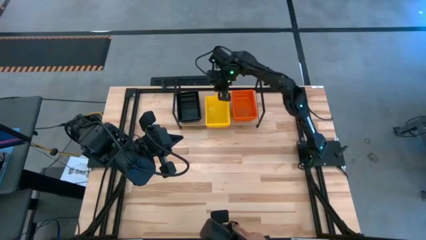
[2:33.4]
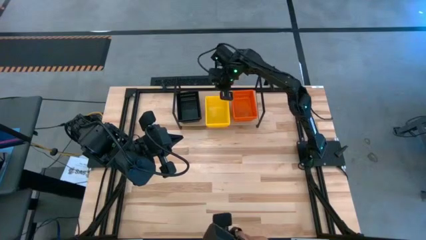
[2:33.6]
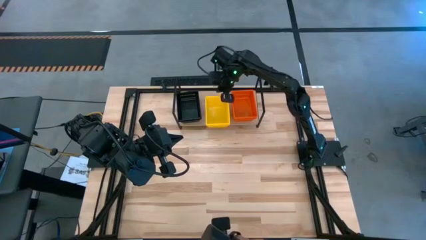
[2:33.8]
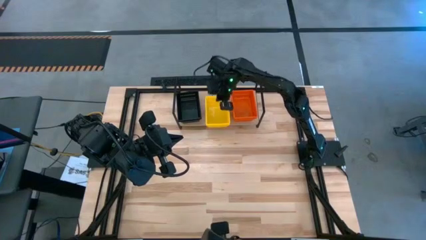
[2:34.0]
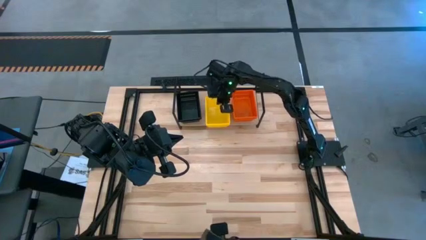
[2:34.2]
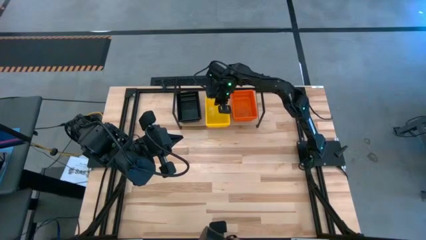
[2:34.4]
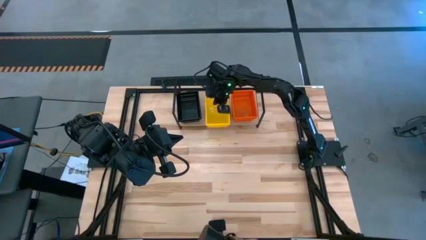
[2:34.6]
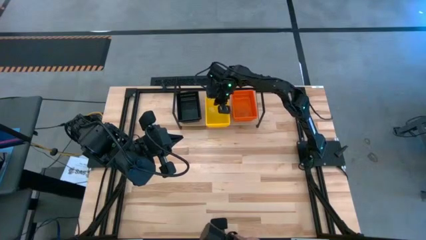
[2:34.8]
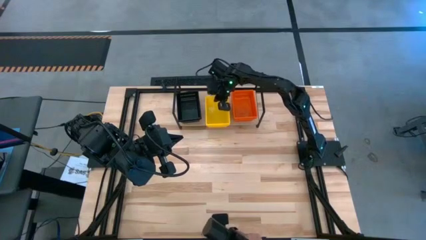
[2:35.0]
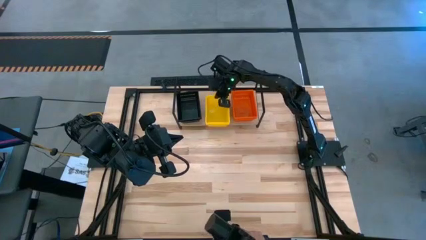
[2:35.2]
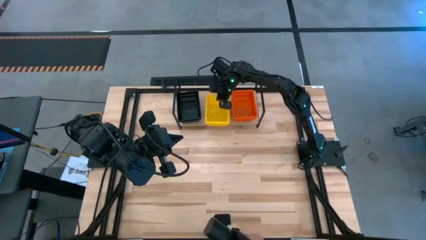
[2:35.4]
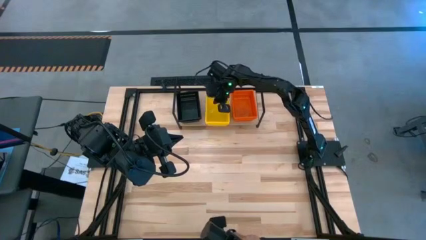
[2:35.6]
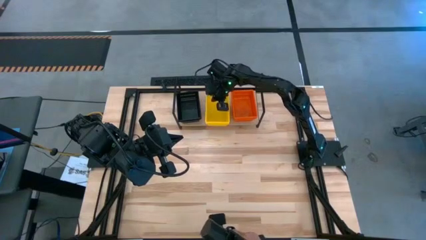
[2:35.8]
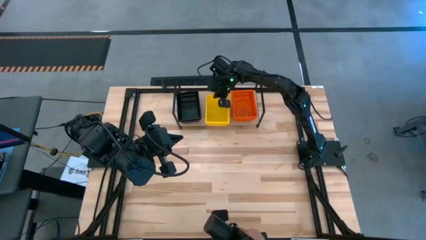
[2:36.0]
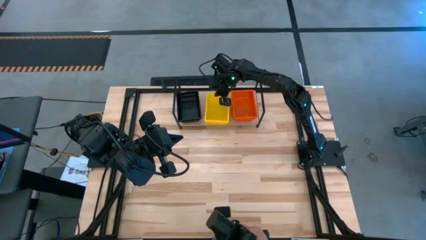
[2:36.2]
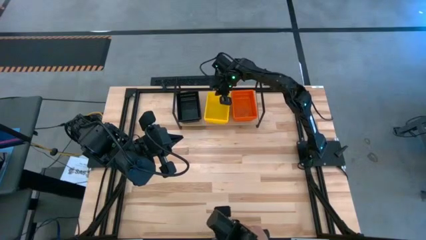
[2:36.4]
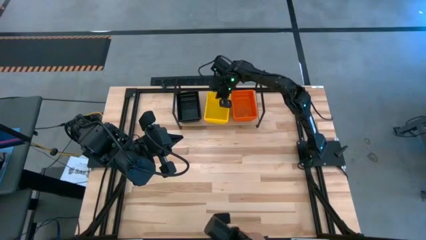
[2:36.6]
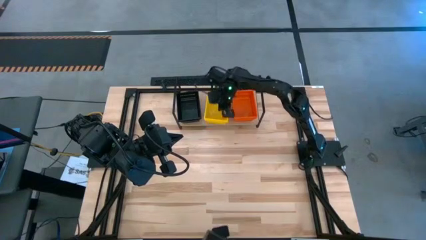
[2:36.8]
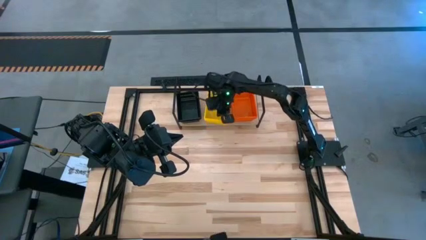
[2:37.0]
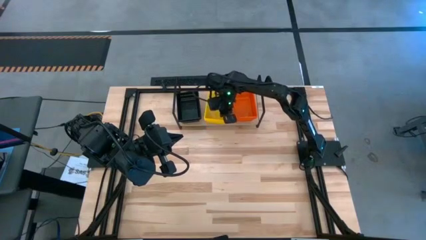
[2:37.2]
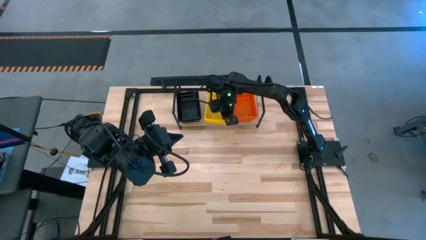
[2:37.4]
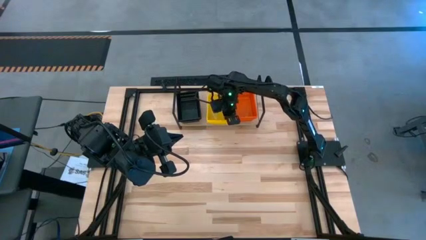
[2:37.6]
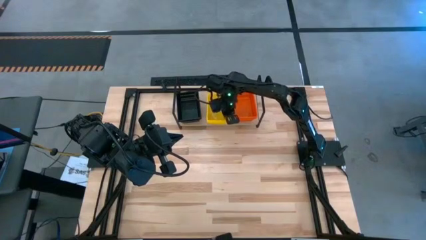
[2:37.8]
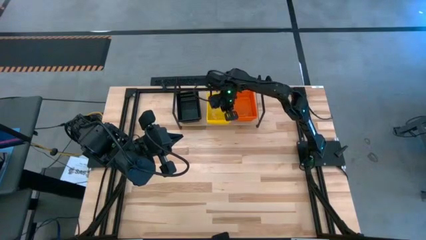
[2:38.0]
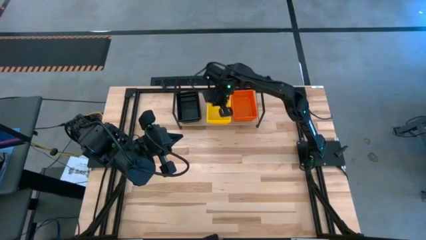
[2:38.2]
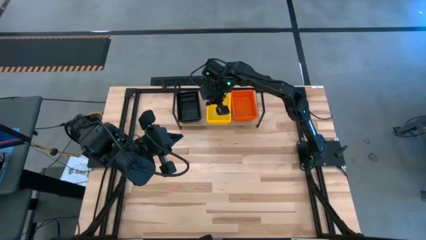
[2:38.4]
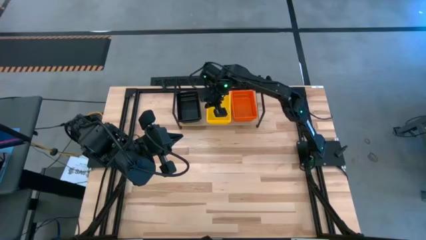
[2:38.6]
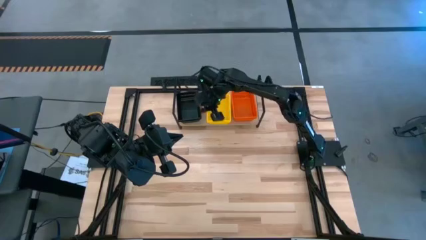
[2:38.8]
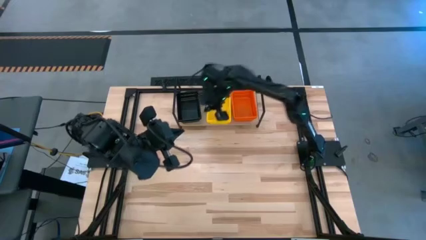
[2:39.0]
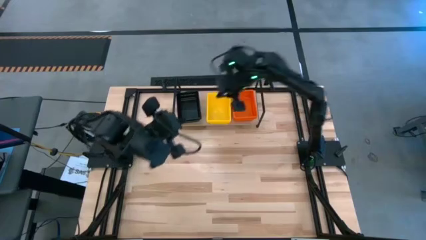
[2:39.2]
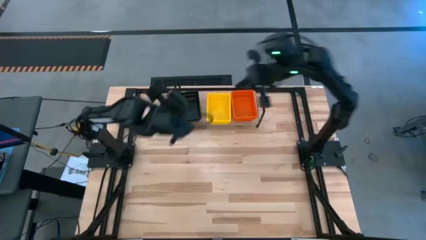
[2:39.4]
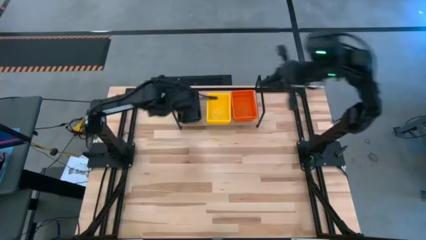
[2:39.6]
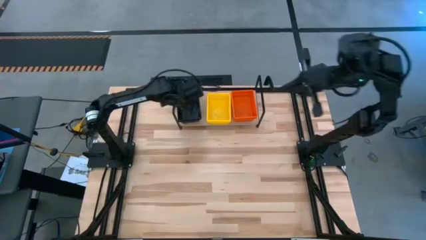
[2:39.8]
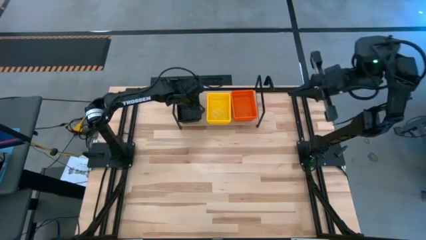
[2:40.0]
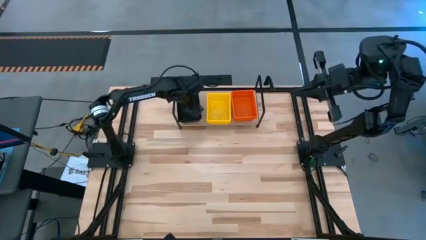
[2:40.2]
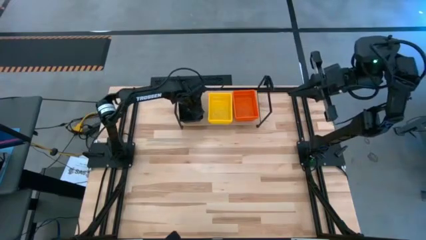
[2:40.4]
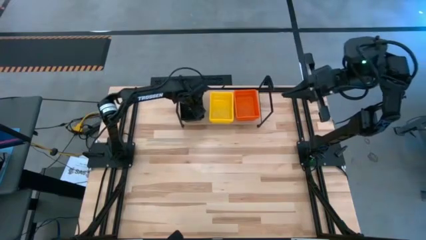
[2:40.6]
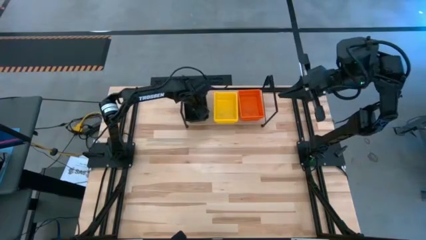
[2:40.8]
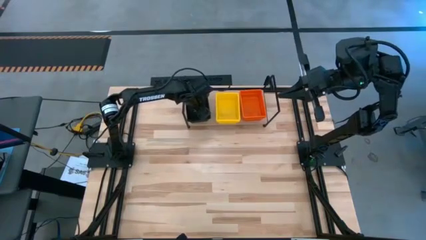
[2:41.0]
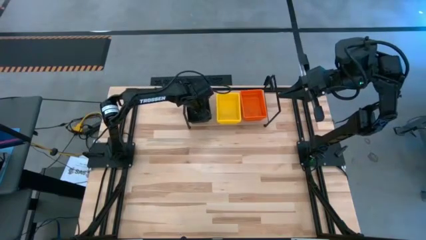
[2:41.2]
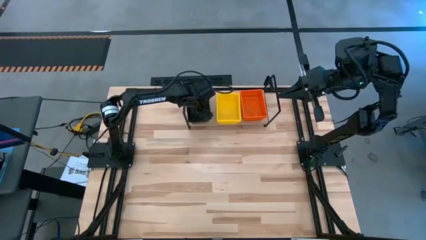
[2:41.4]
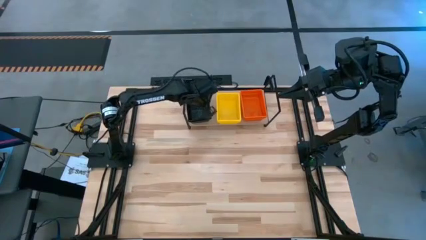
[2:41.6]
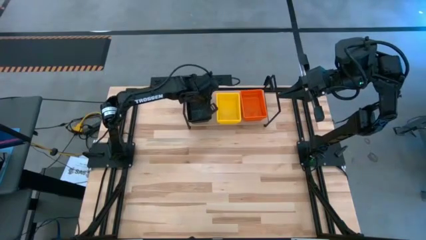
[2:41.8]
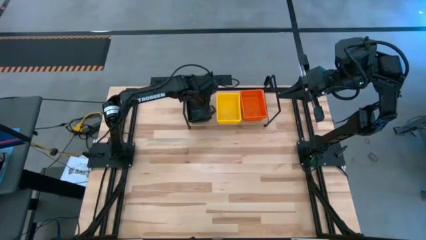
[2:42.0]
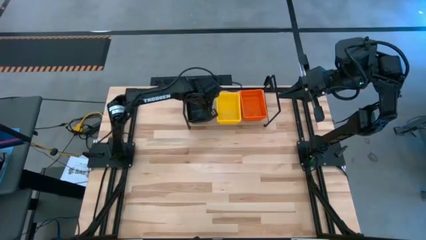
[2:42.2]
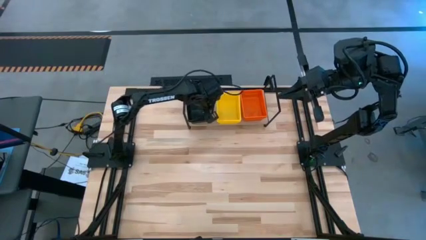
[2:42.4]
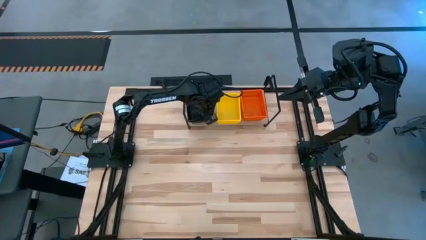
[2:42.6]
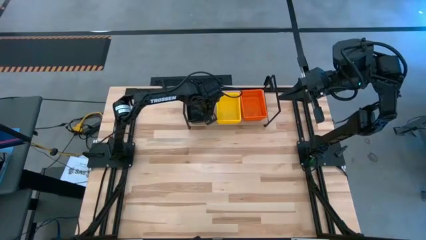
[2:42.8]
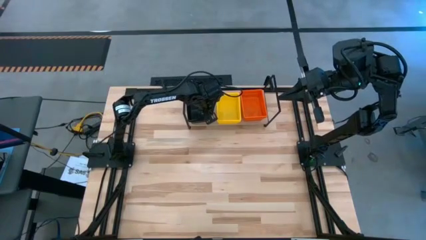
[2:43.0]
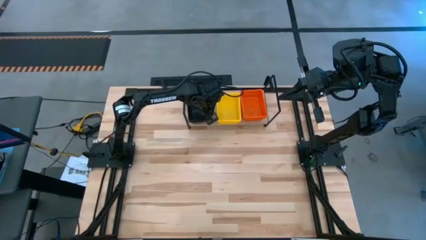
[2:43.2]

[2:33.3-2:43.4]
Task: Stack baskets on shelf by color
Adjust all the bins on the shelf

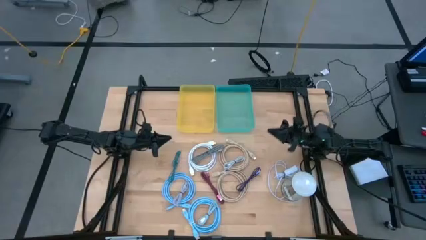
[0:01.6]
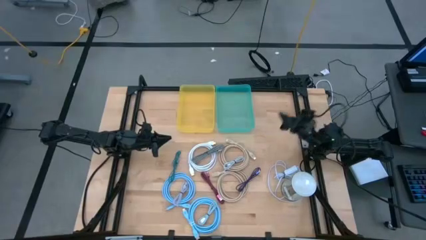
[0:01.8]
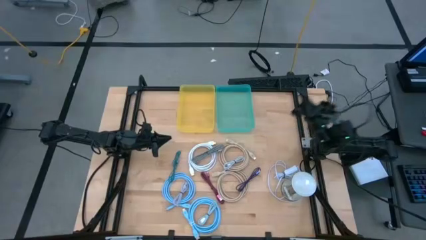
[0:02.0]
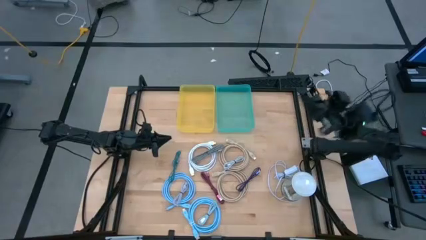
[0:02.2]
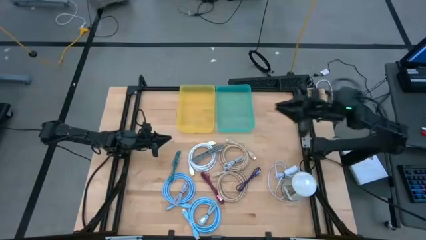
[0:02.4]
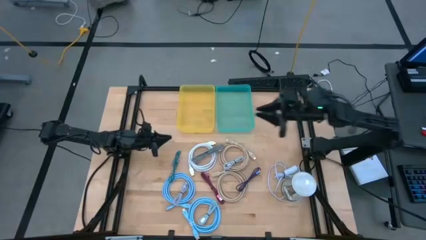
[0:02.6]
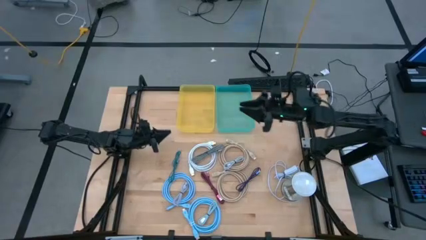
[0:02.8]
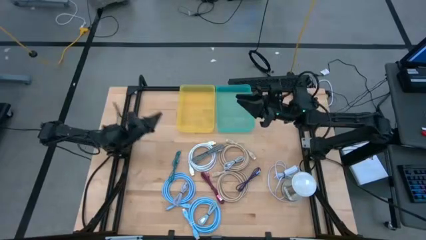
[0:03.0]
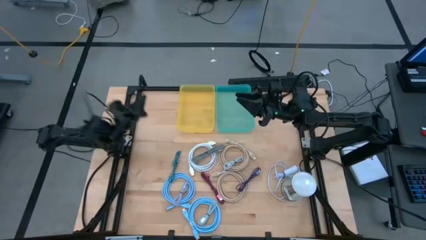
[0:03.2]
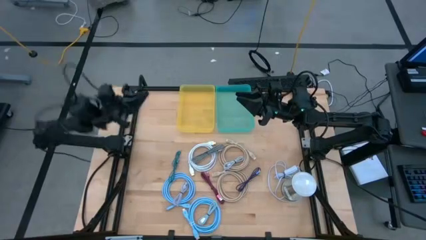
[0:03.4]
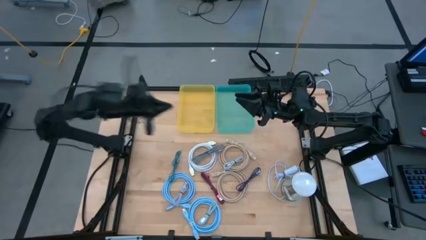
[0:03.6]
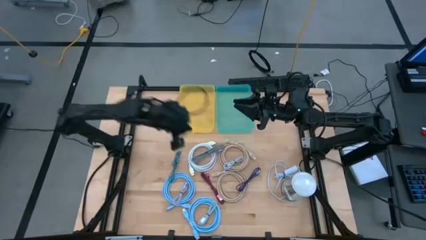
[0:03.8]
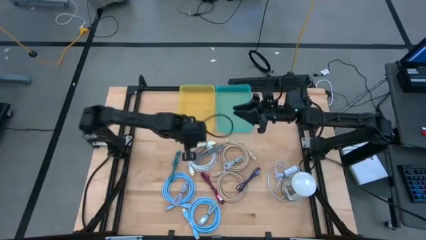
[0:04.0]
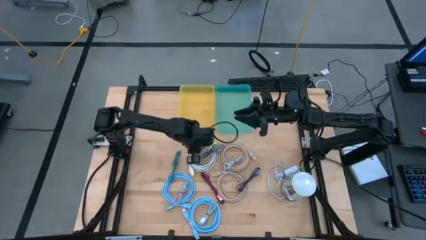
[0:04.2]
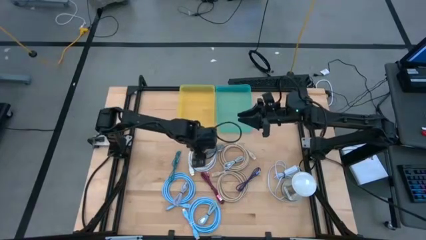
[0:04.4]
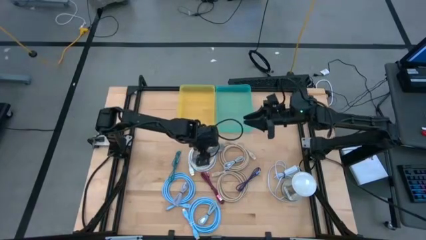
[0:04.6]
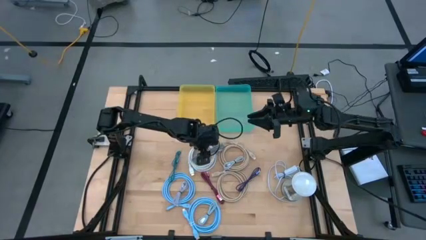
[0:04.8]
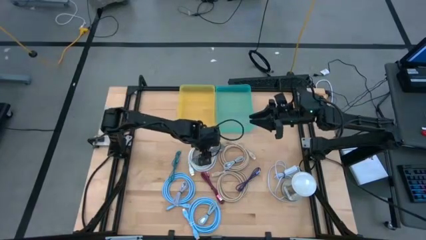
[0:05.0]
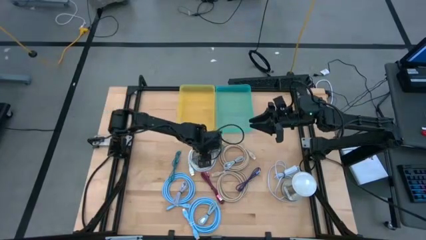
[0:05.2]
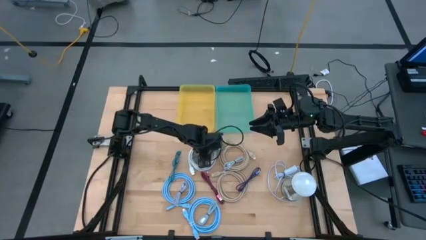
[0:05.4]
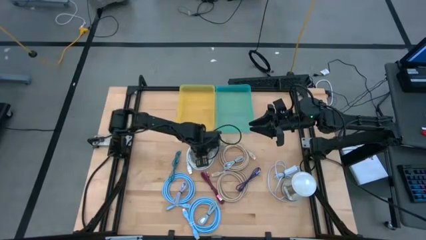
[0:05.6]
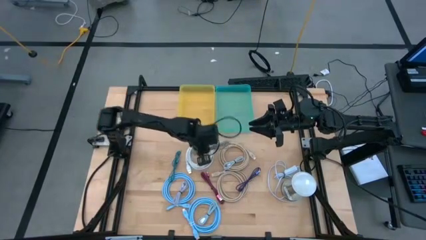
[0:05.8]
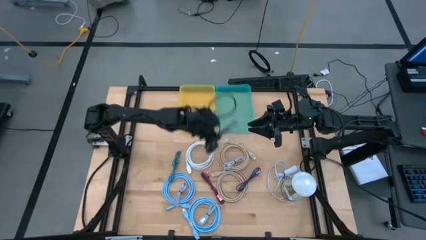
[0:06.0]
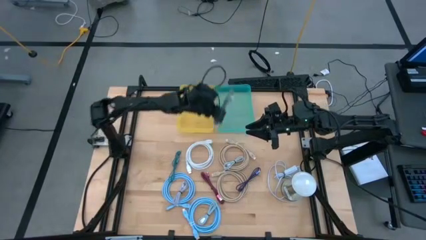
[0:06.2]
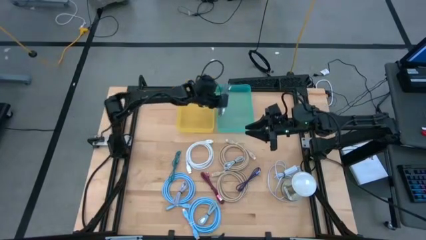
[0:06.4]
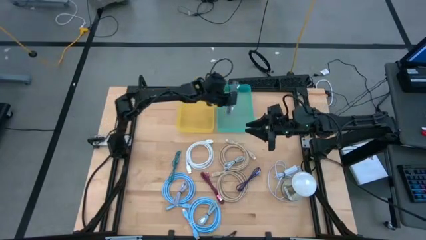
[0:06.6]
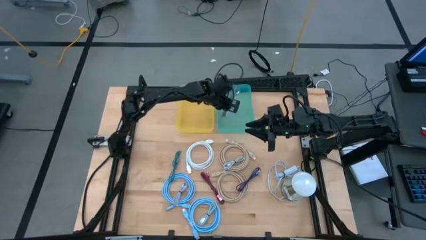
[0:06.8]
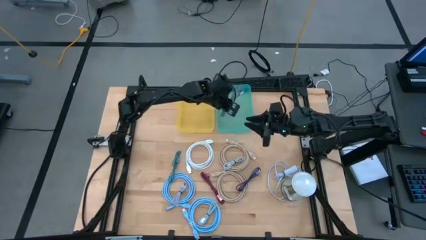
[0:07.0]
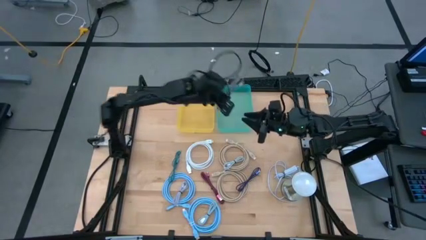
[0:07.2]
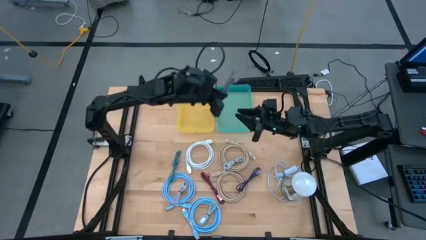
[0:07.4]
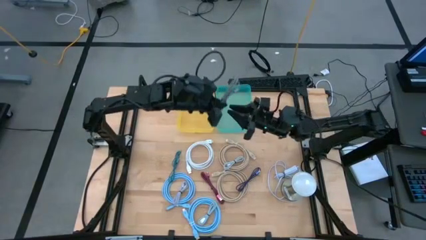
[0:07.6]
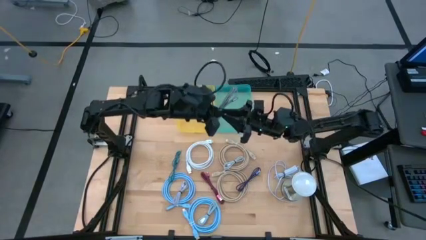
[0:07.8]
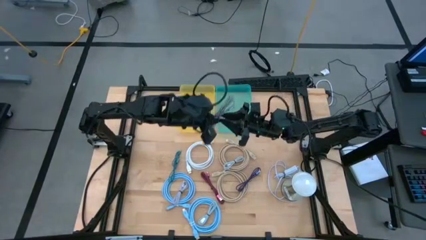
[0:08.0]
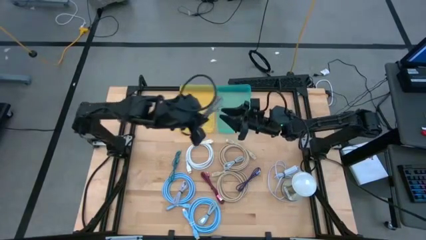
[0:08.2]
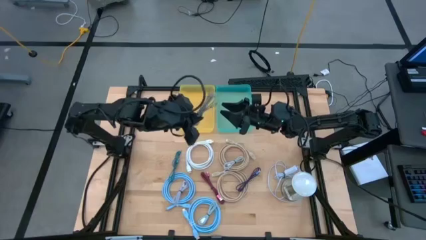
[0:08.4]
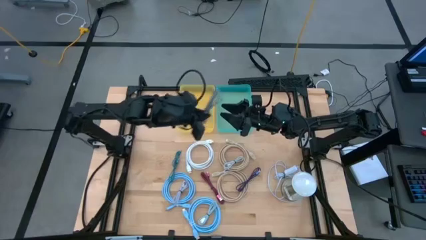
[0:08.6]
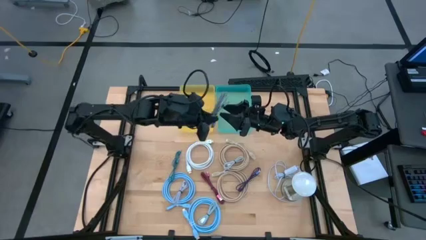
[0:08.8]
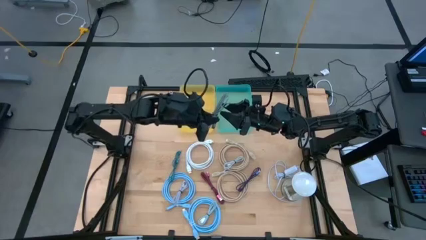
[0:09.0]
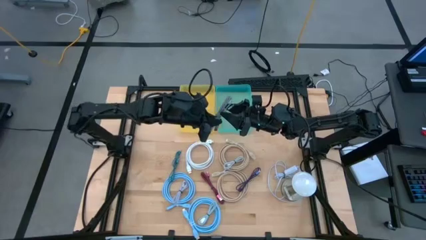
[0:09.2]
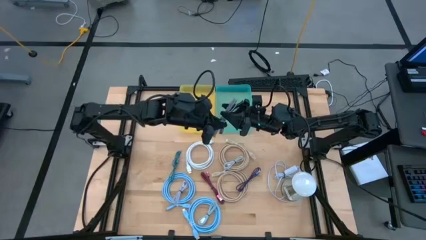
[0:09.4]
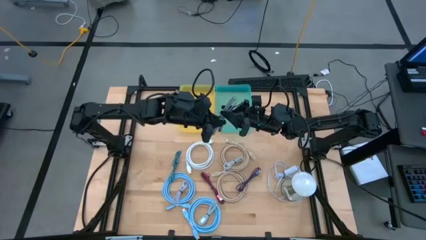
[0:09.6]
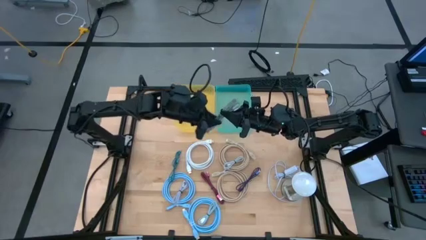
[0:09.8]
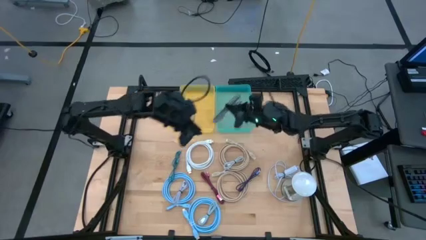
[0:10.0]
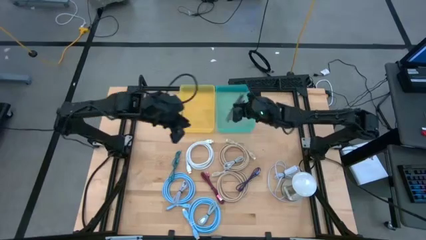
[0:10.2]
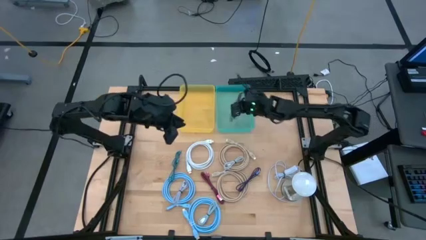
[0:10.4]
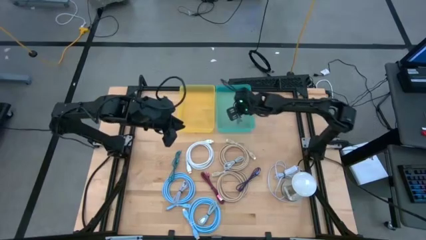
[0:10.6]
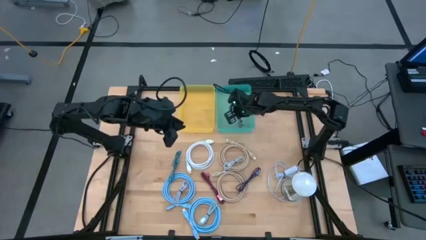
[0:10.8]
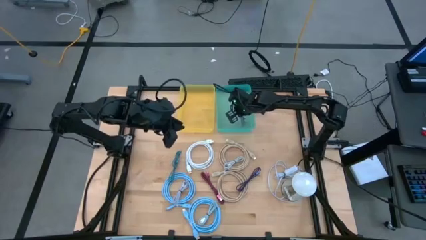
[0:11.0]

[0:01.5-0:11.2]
Task: Pick and place USB-C Cables
Put the small white and black charger cable into the green bin
